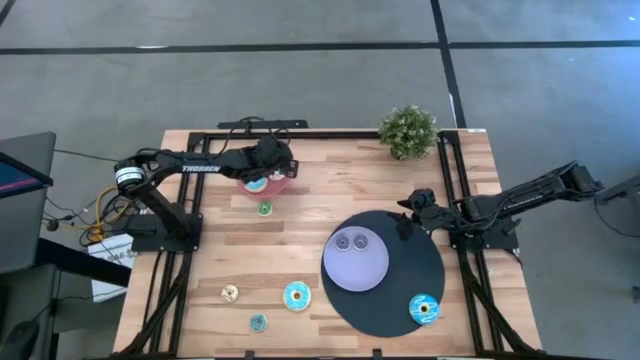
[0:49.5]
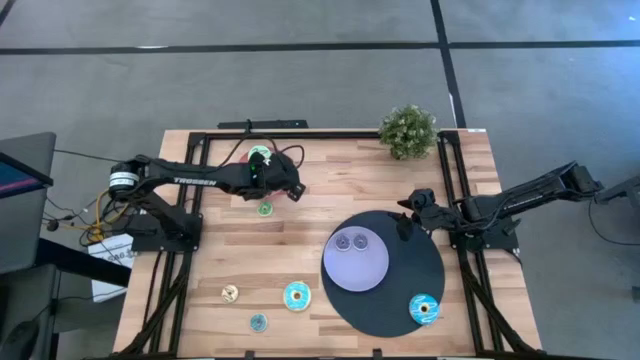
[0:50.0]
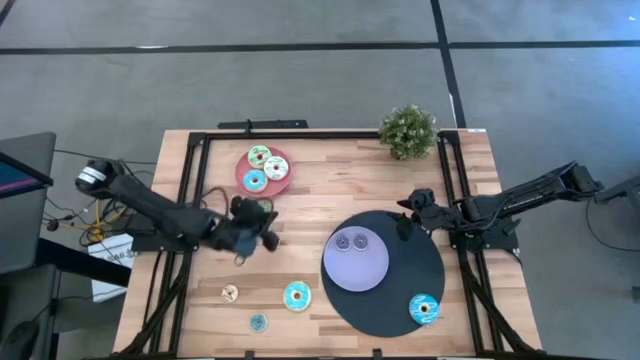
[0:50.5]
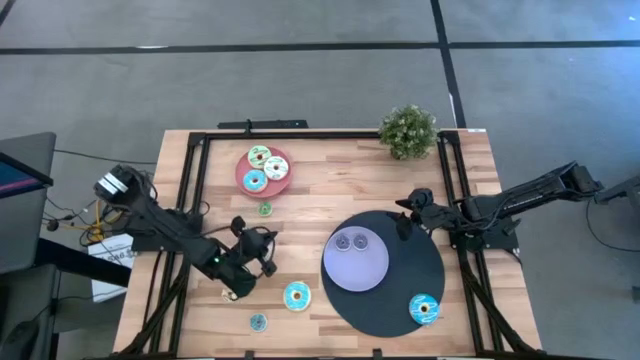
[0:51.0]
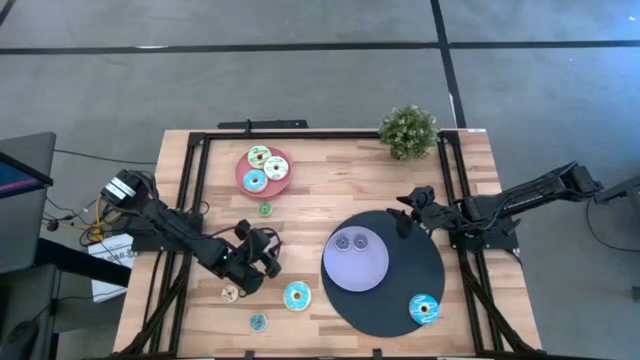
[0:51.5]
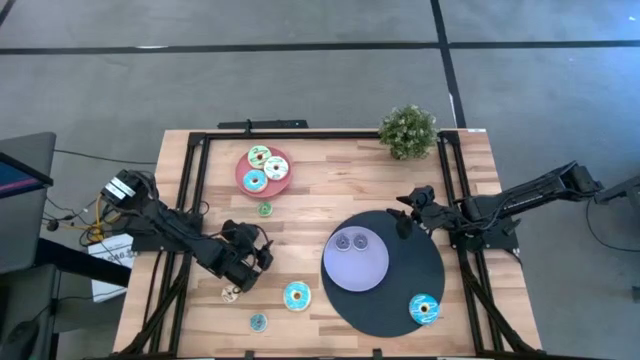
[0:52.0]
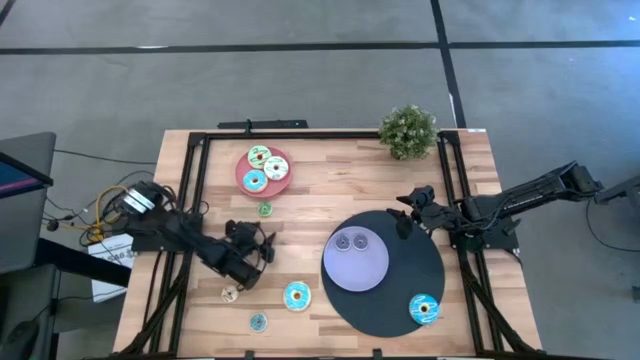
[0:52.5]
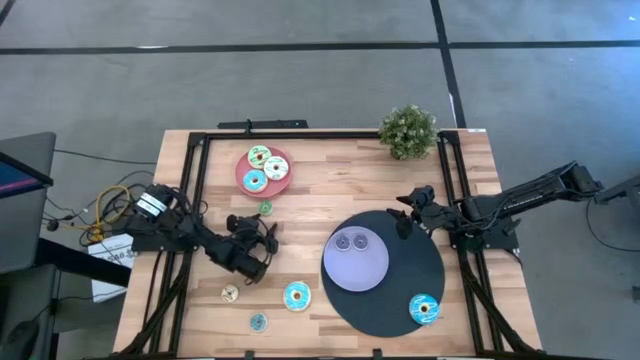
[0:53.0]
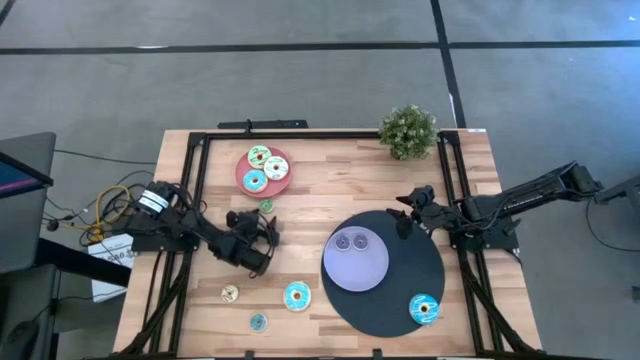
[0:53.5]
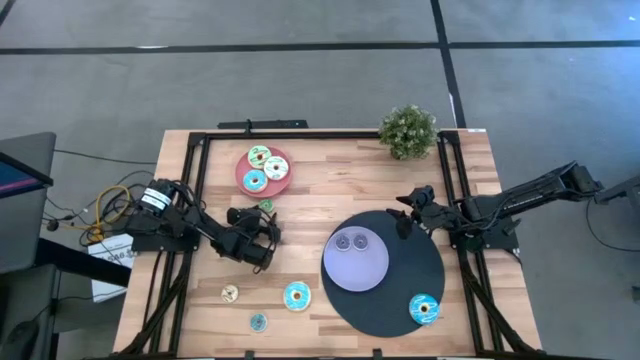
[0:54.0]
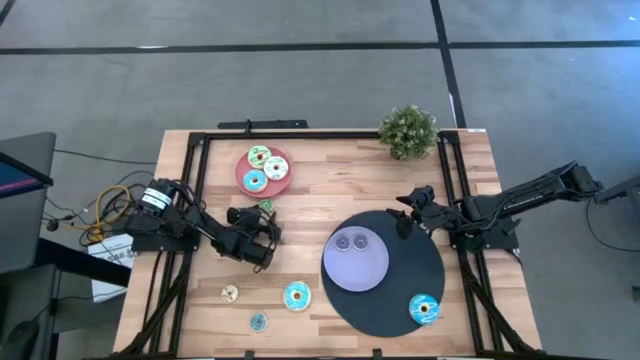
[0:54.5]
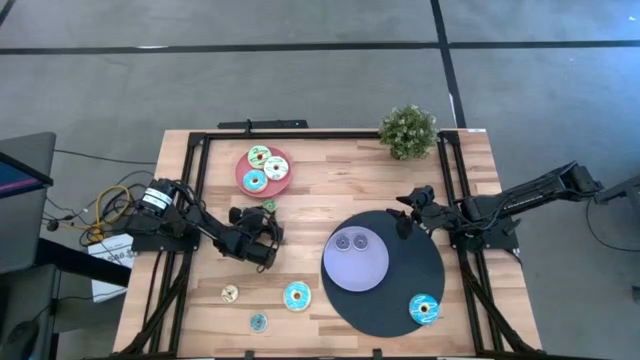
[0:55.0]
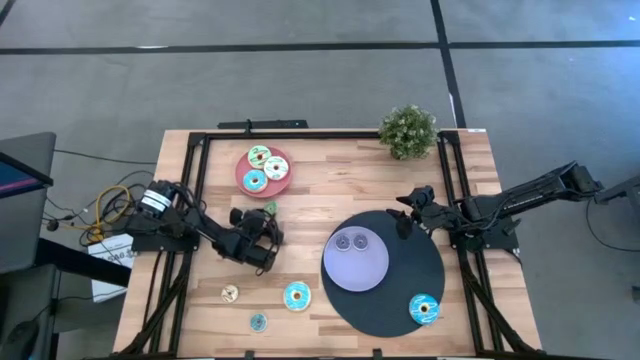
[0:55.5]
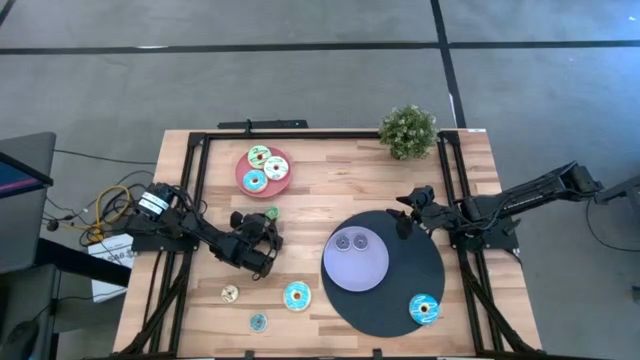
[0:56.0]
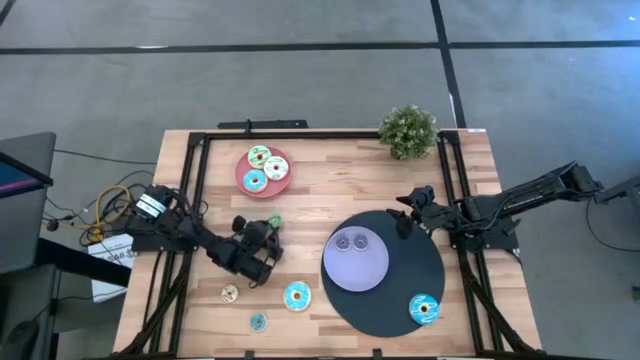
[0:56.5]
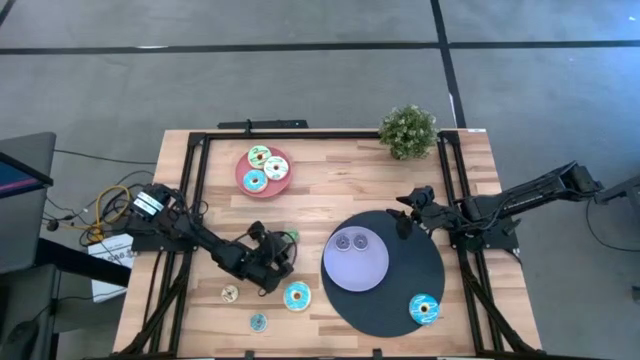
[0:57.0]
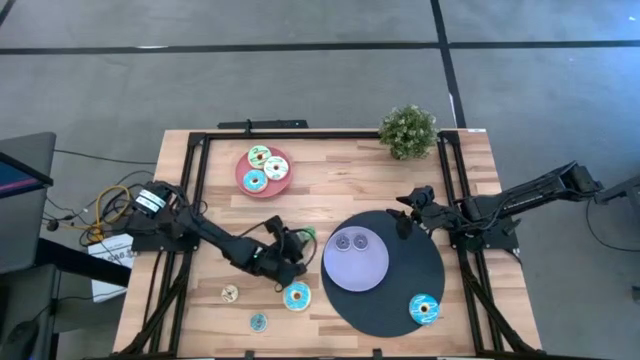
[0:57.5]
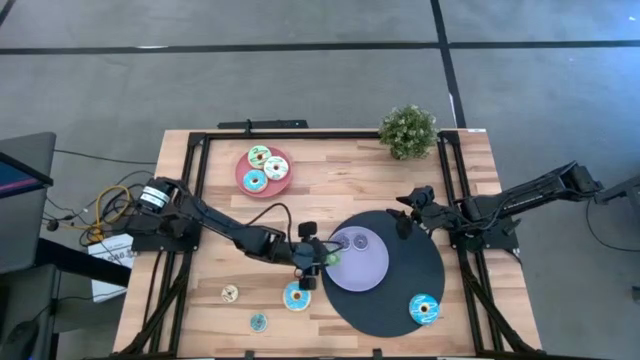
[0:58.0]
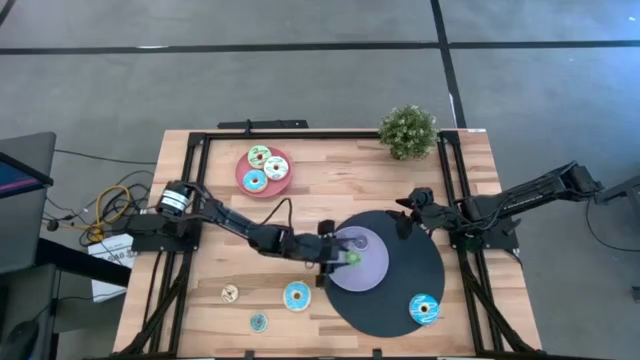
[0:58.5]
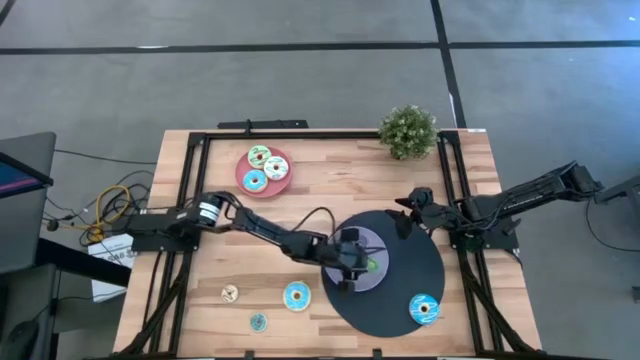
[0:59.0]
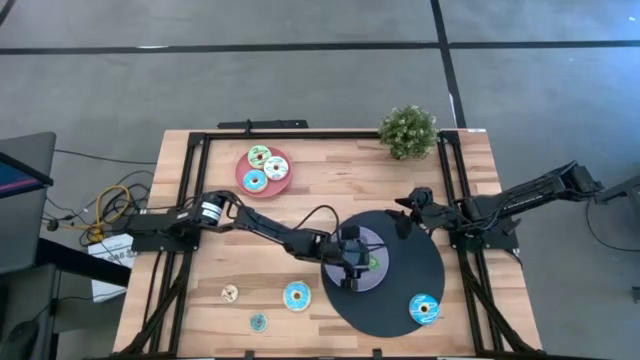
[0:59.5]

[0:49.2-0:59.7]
Task: Pick & Place donuts
Put the small green donut on the purple plate

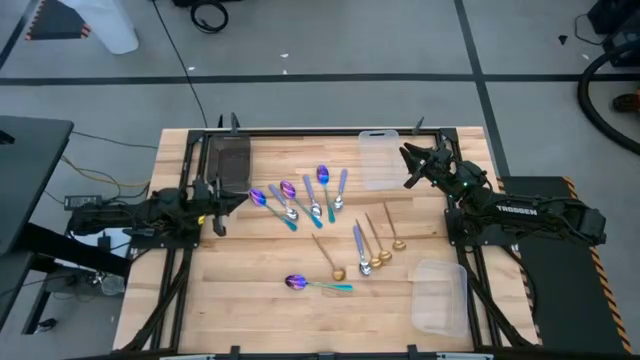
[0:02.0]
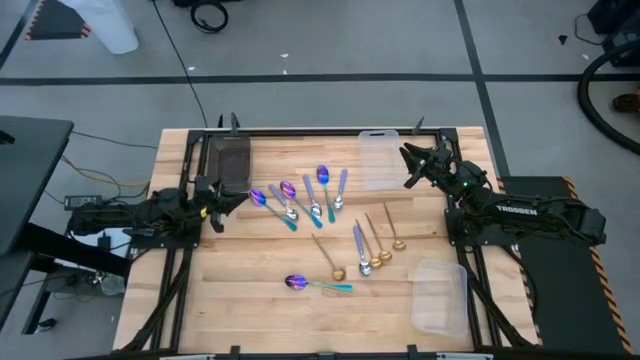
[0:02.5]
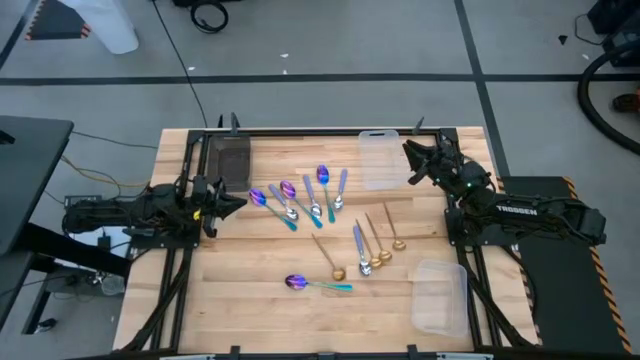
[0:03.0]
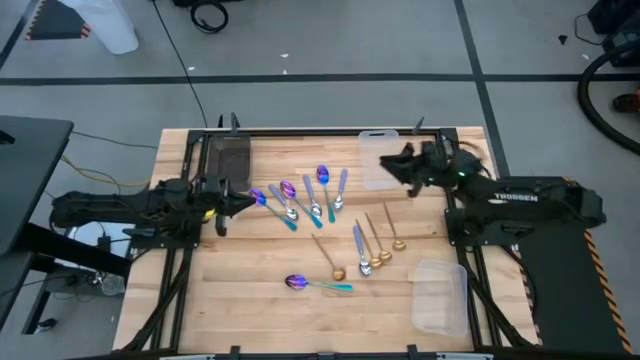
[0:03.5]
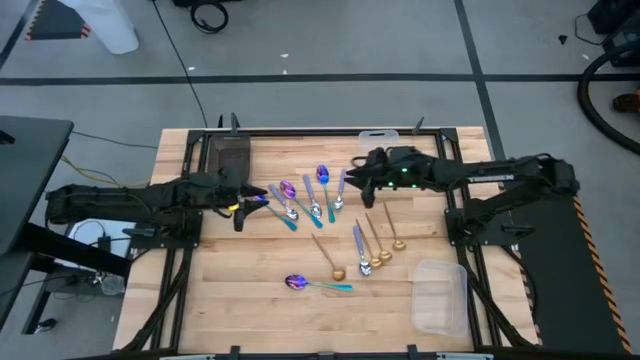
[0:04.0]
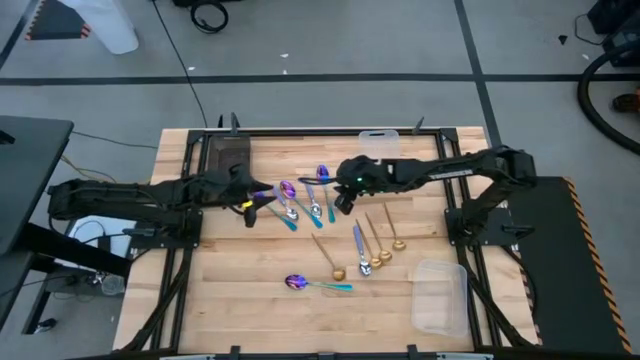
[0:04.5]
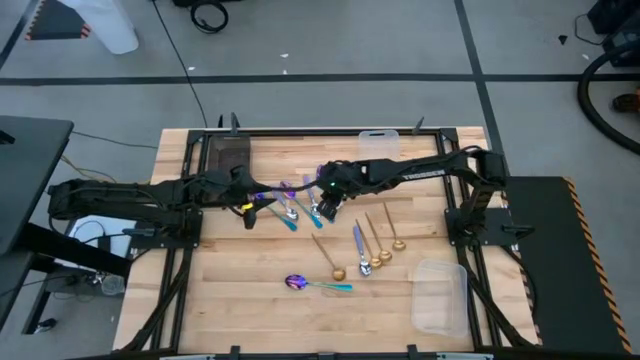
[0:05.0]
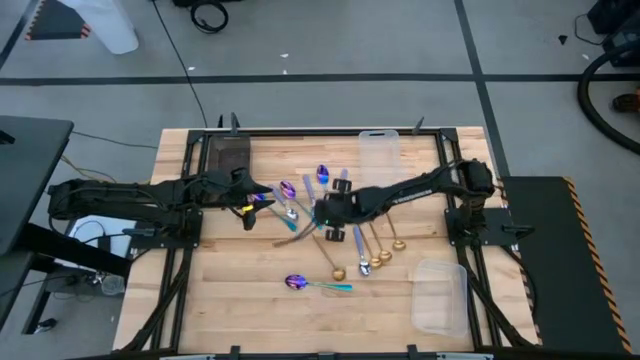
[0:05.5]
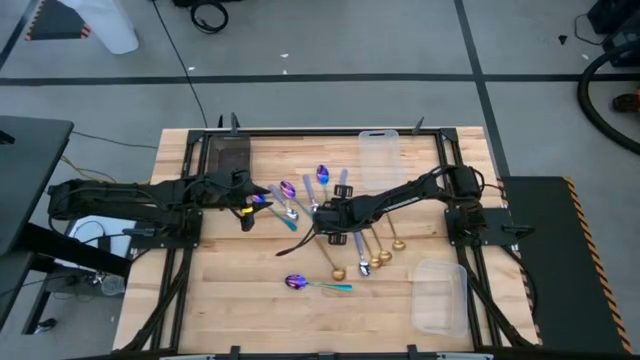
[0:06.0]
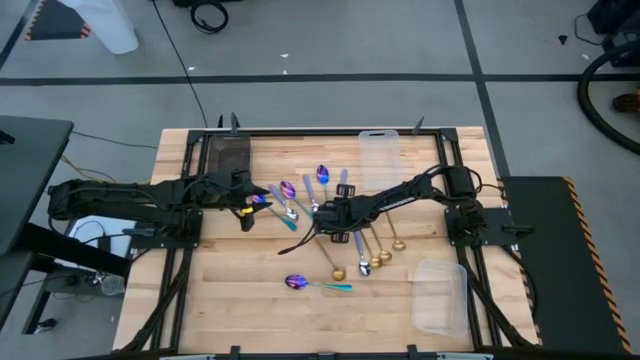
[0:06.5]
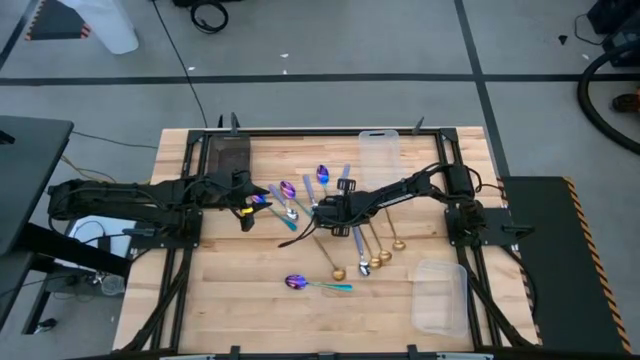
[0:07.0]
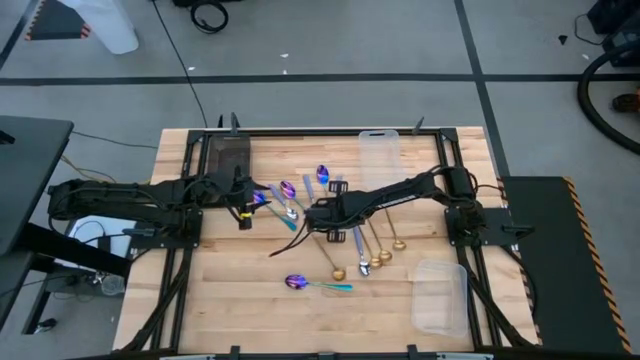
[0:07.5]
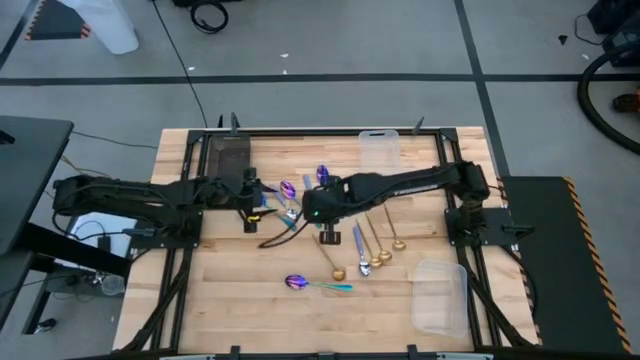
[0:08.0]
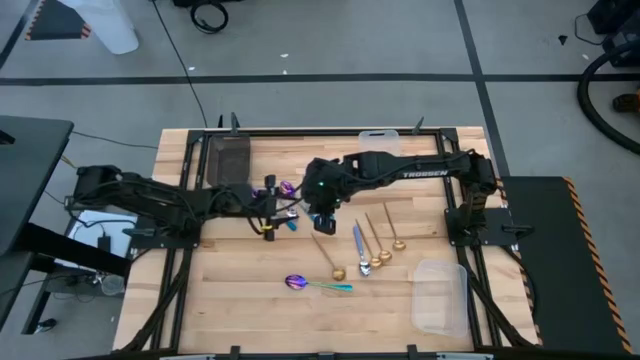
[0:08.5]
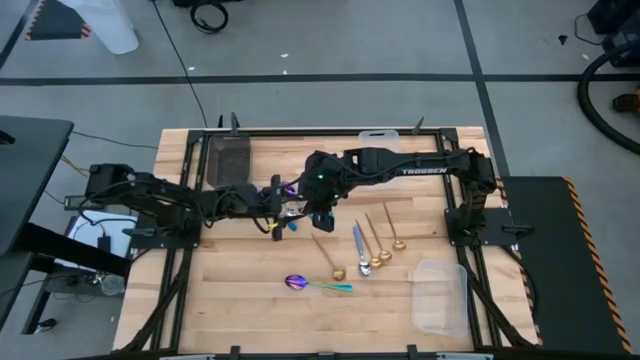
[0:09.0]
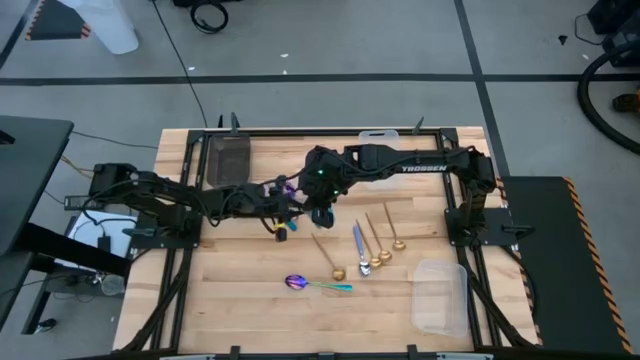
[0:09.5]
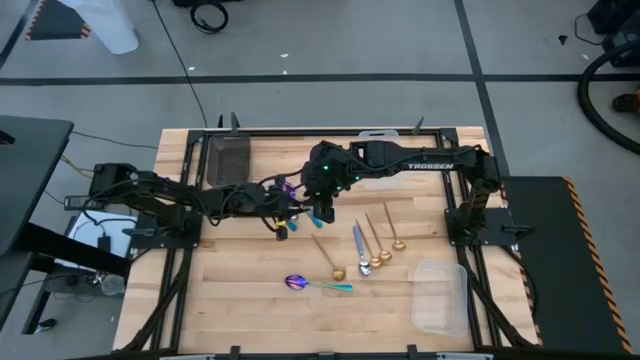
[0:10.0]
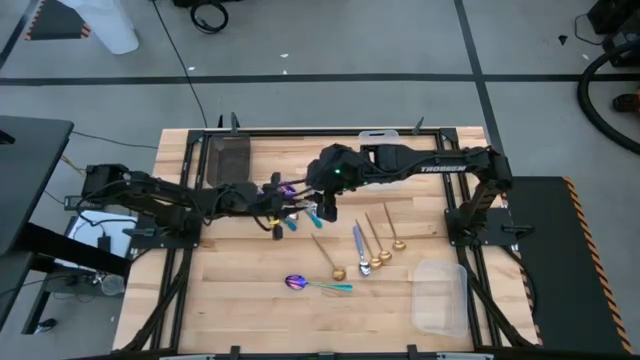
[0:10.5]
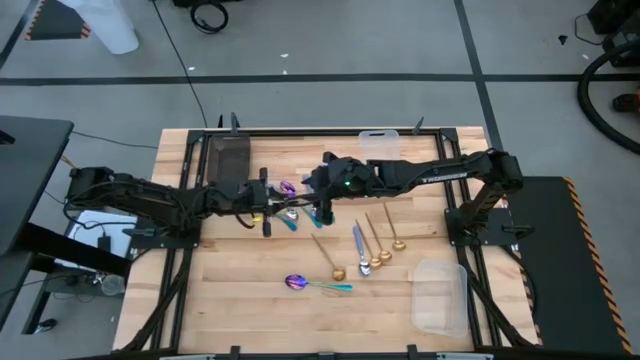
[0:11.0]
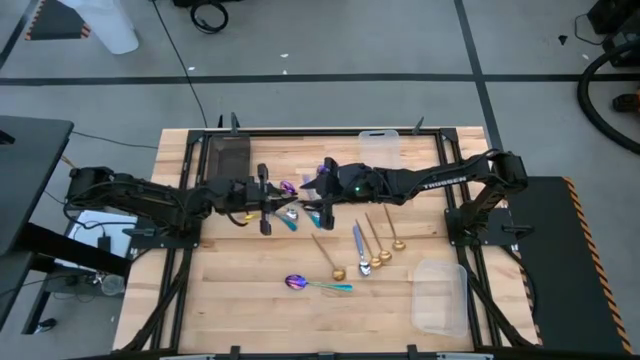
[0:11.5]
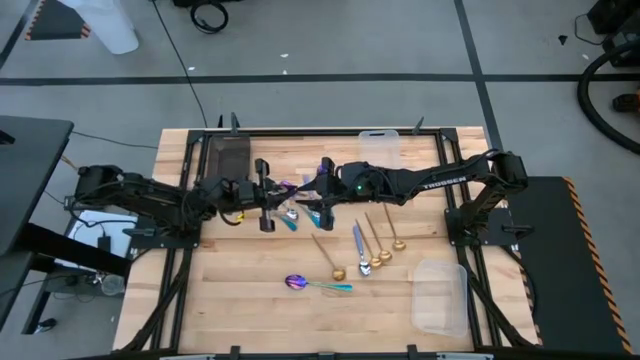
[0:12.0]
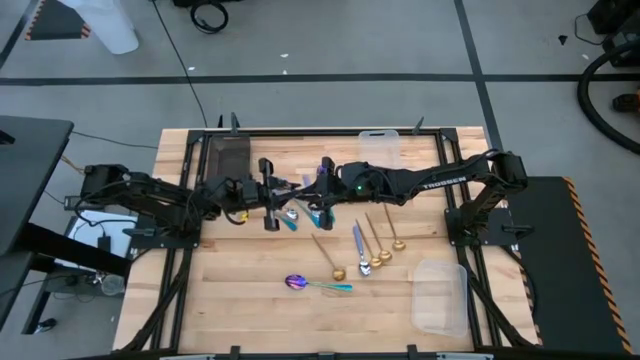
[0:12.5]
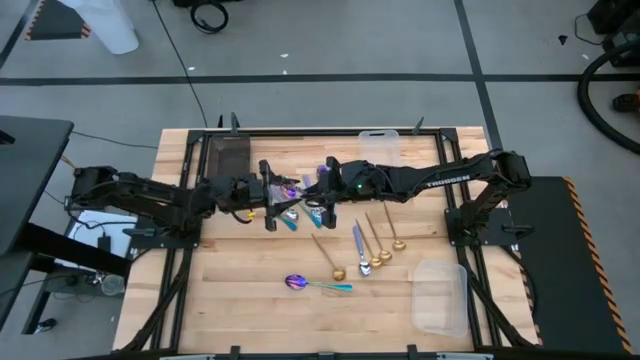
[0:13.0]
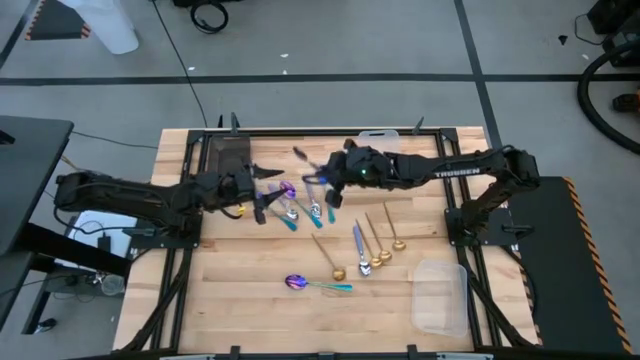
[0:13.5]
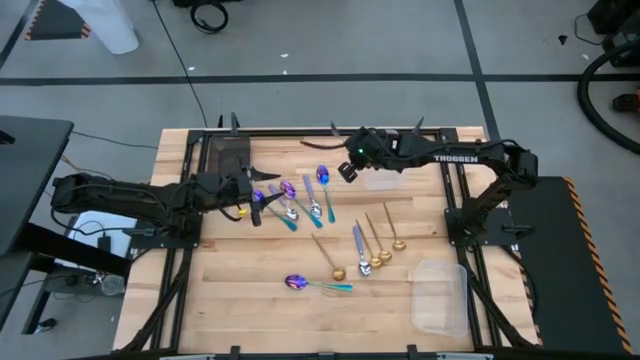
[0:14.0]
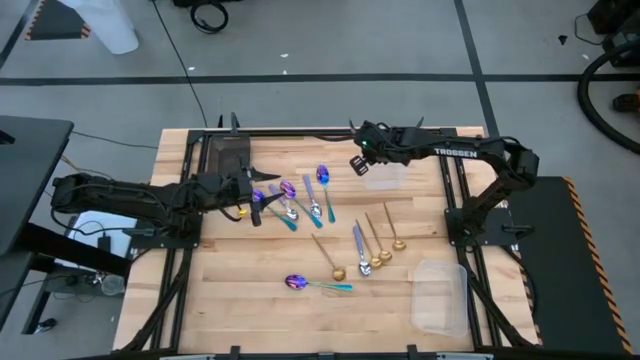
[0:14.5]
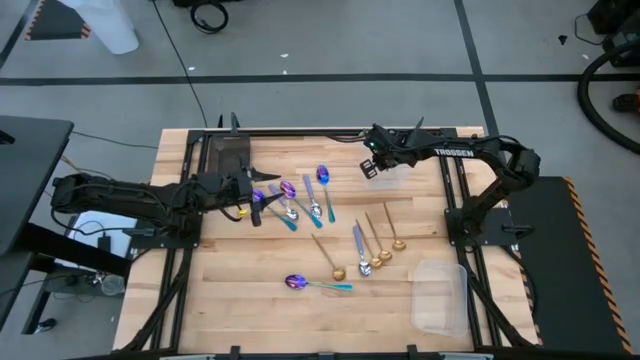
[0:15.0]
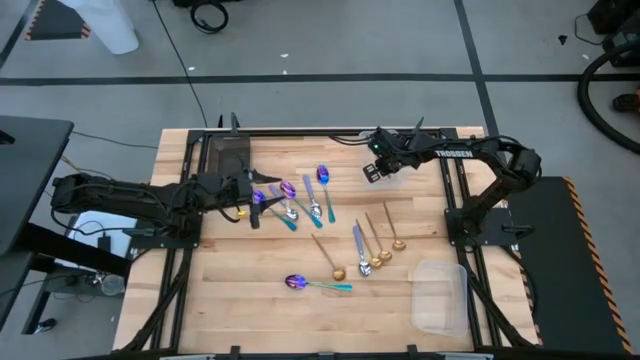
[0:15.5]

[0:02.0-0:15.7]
Task: Sort silverware by color (type)
Put the purple spoon into the top transparent bin
